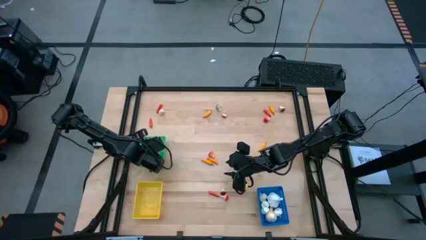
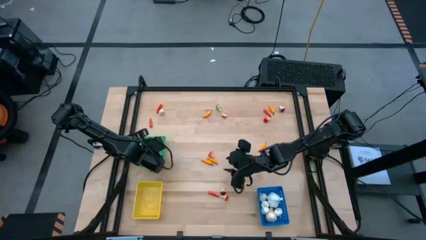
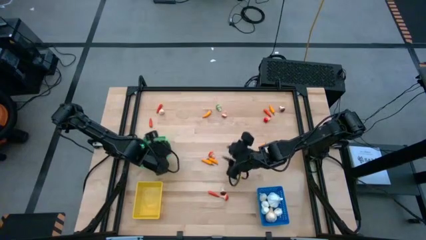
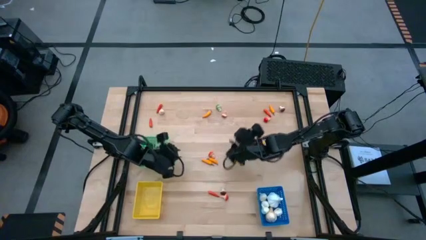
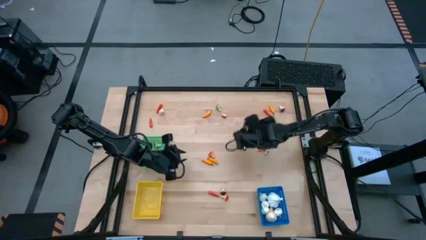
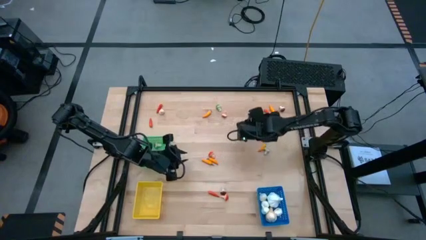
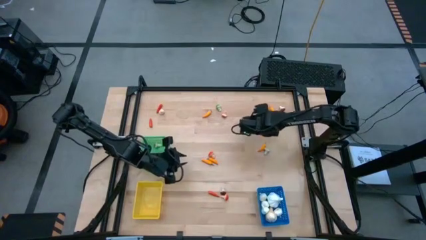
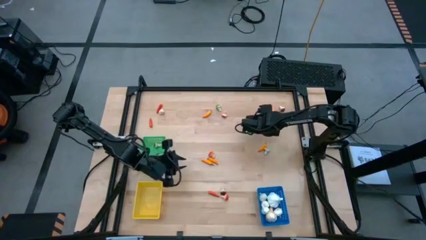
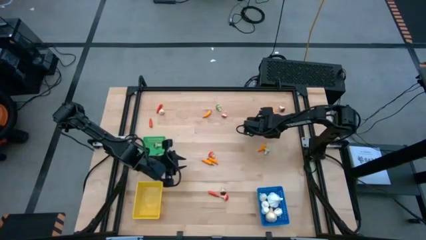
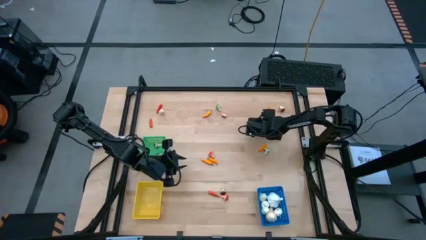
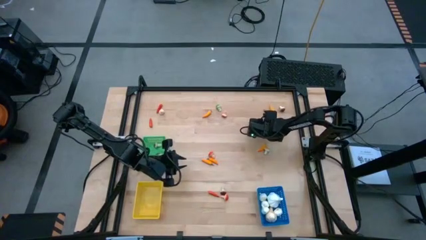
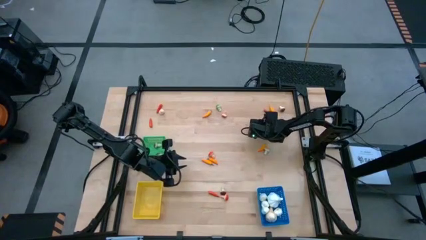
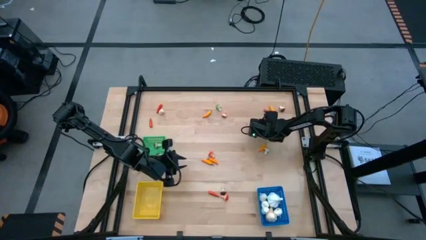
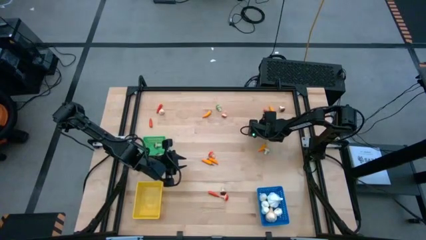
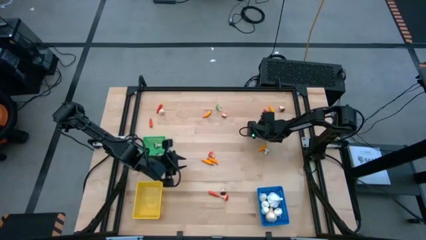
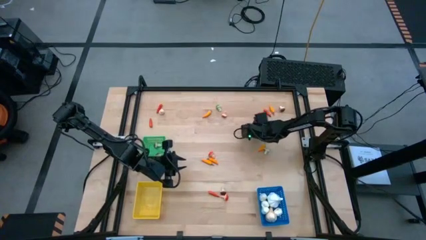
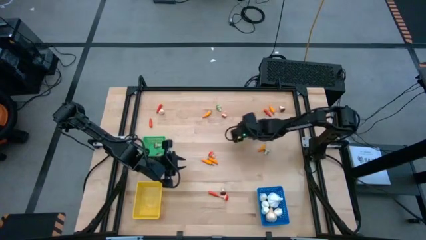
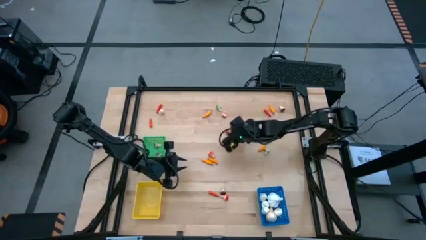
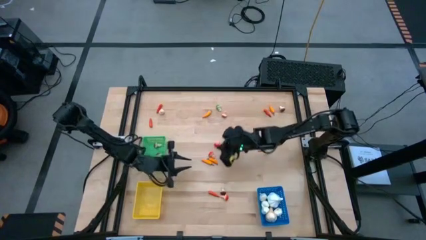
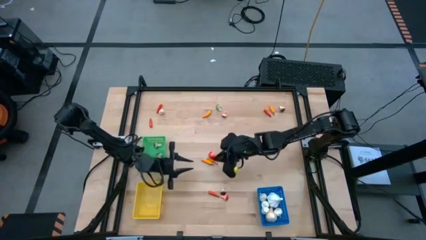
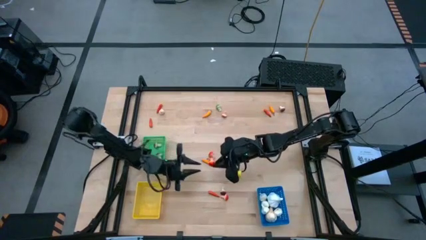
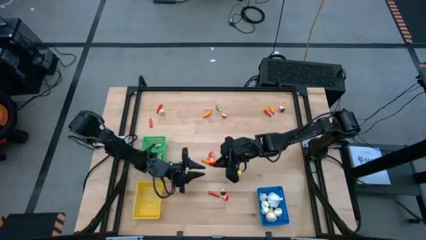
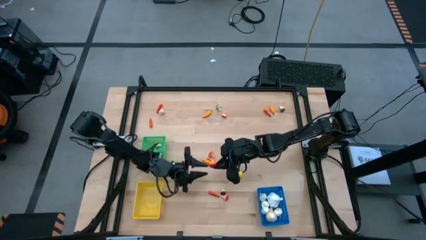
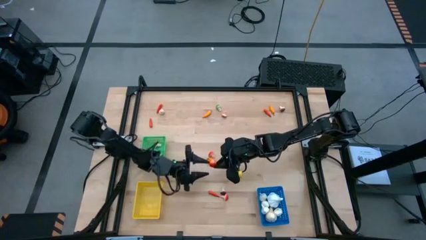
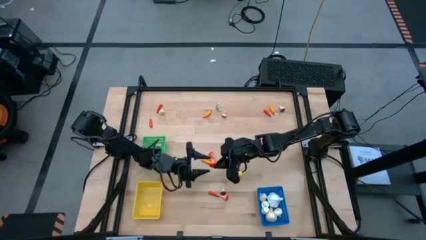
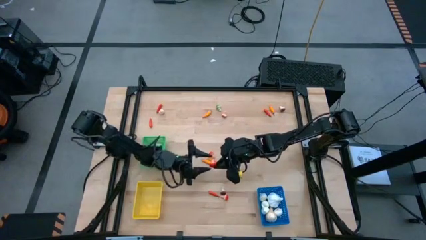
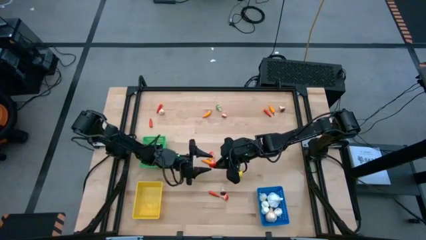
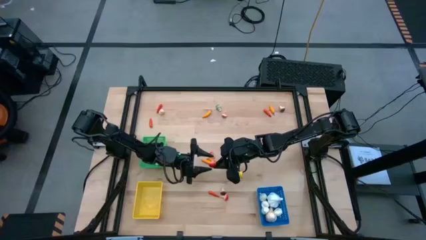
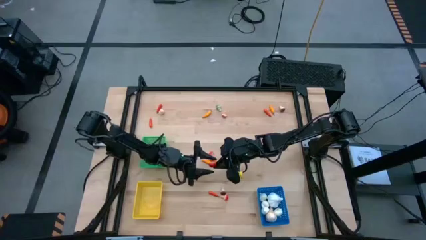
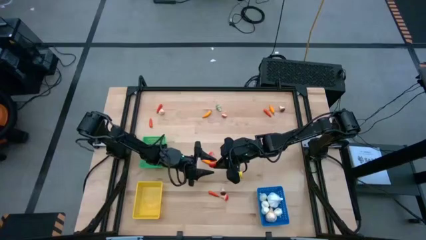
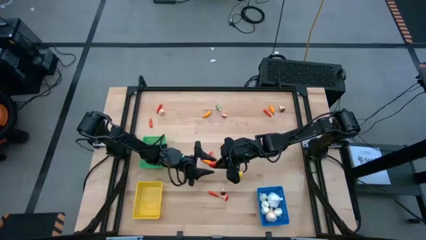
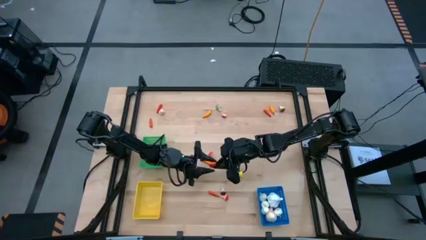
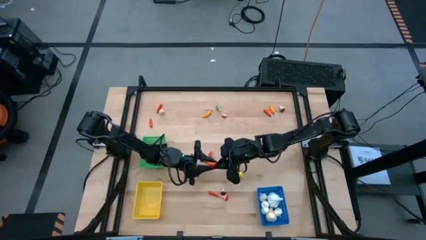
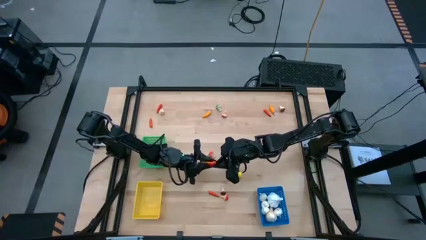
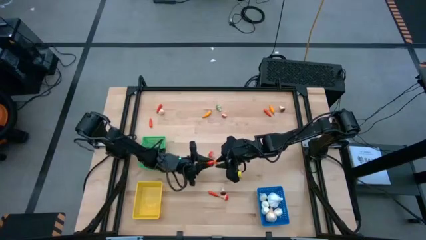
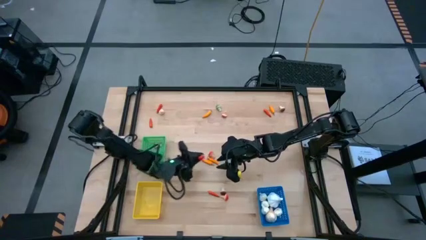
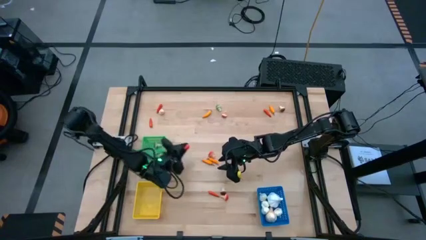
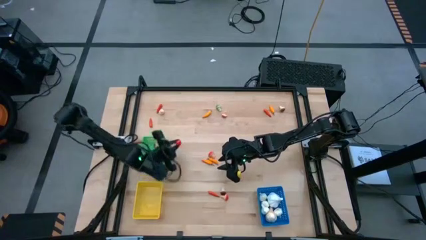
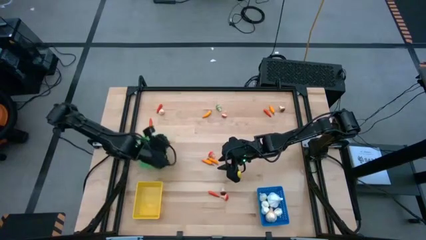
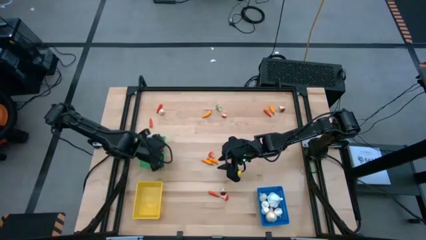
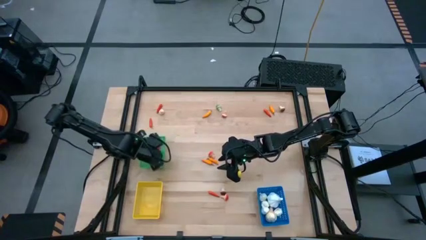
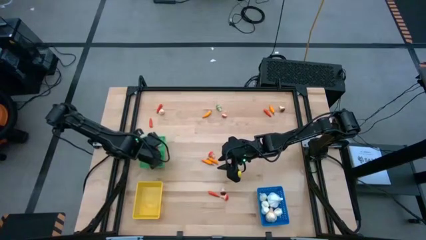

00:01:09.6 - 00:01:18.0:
Task: Sort produce into baskets
Put the red mushroom into the green bin

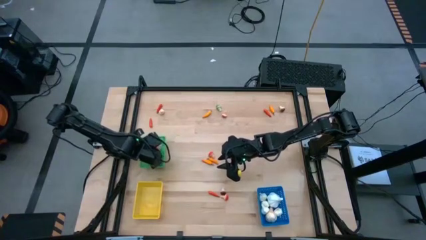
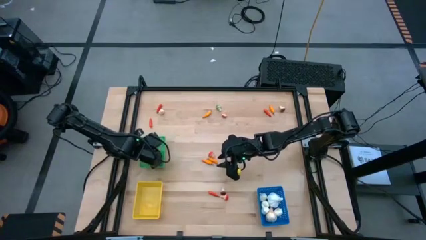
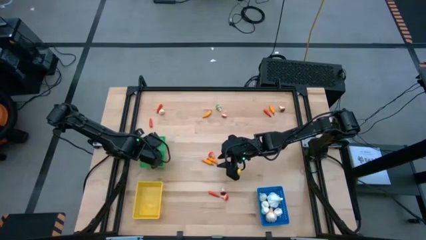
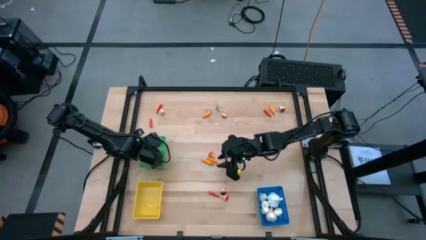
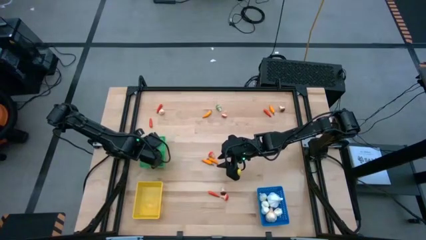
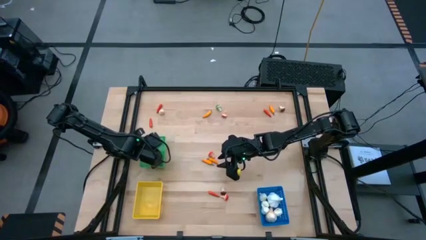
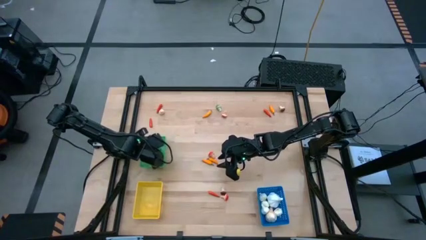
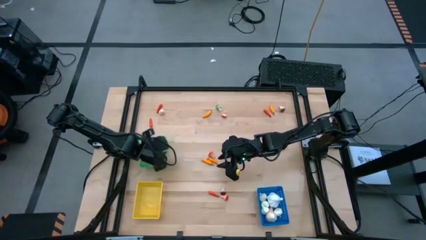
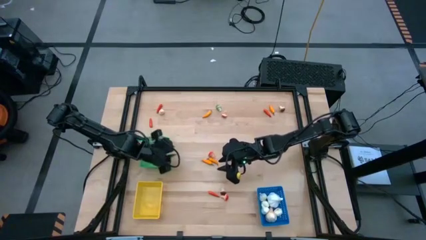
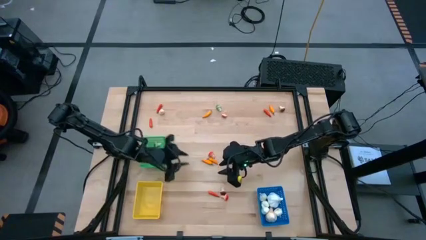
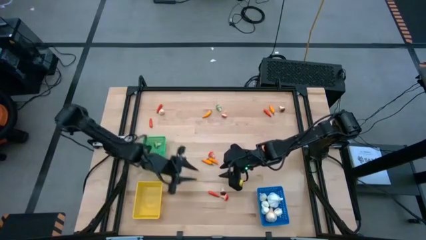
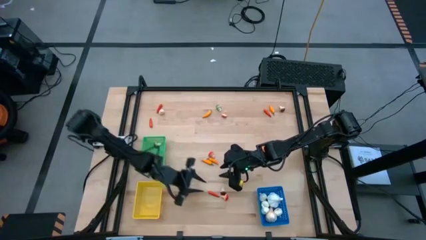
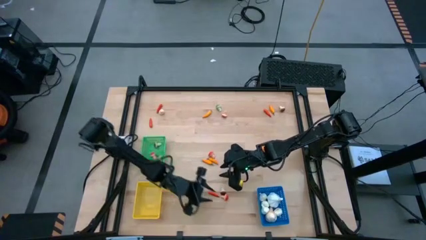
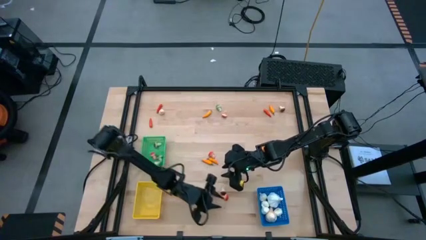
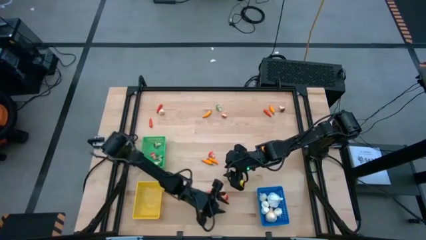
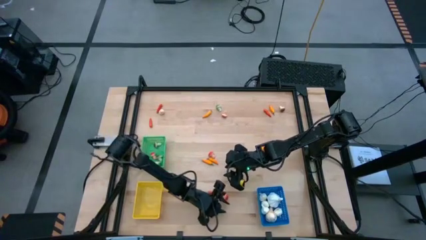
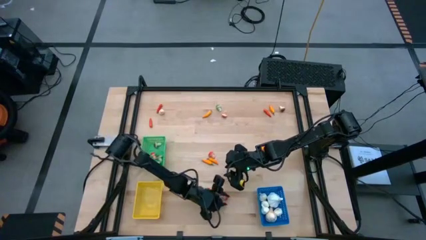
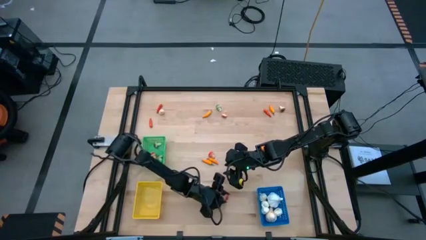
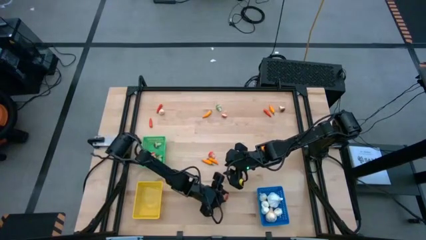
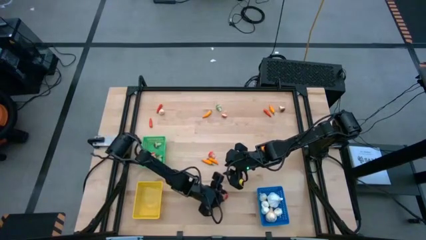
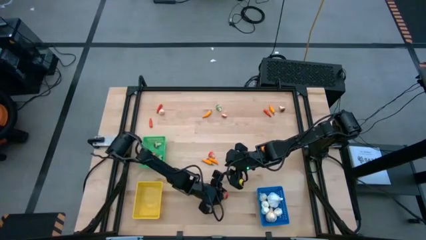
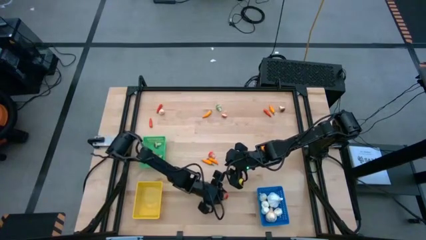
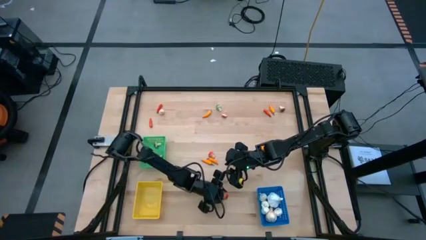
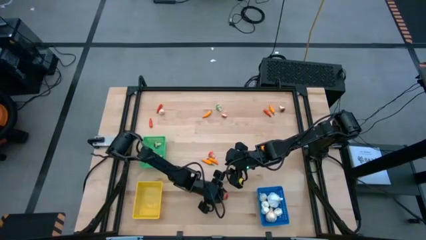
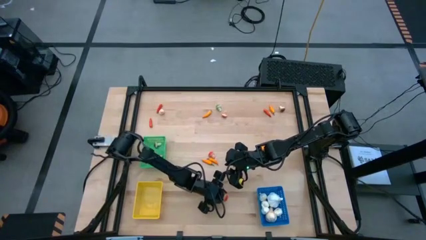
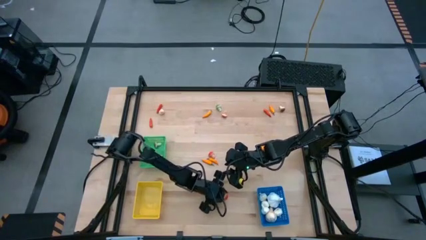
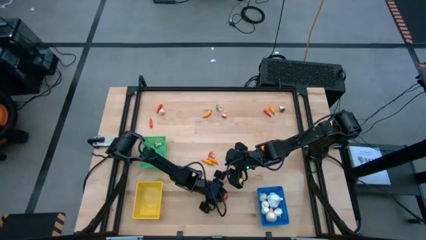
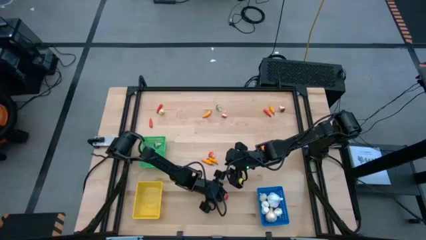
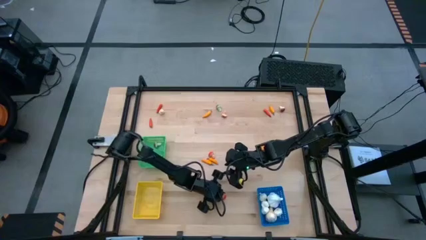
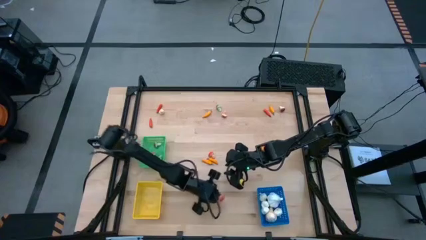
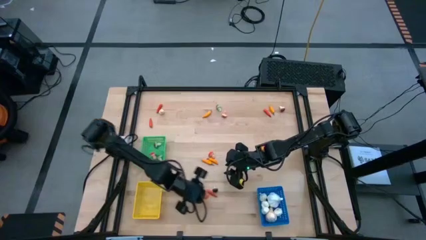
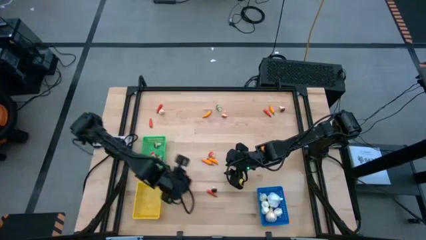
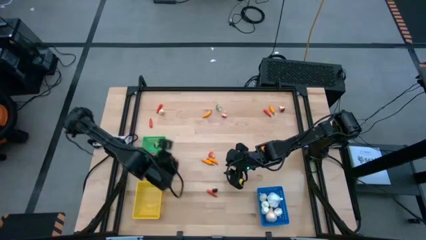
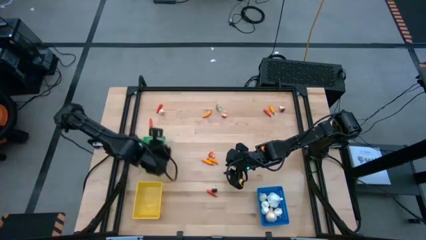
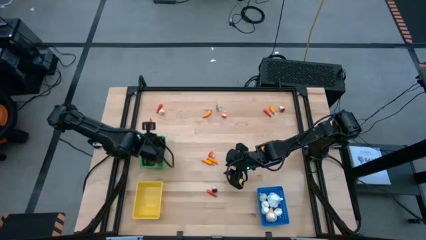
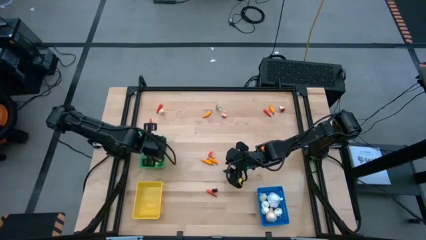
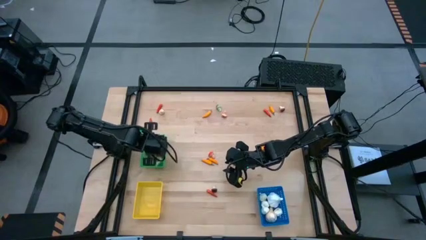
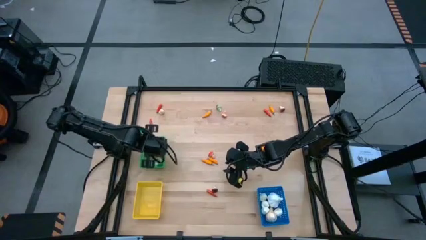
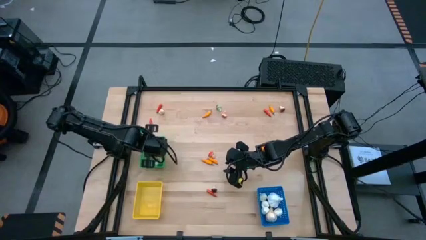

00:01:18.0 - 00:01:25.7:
Put the red mushroom into the green bin

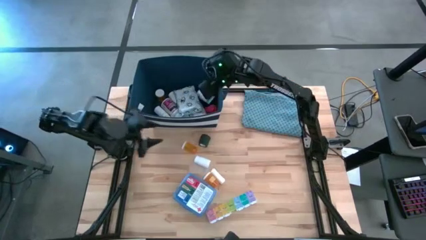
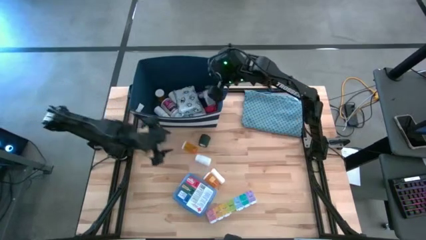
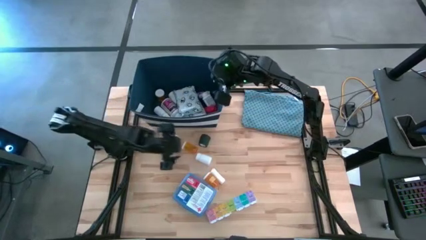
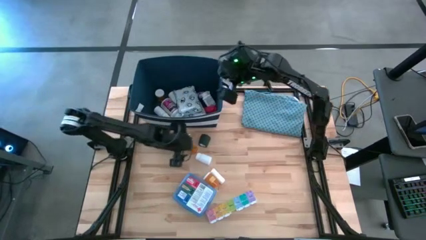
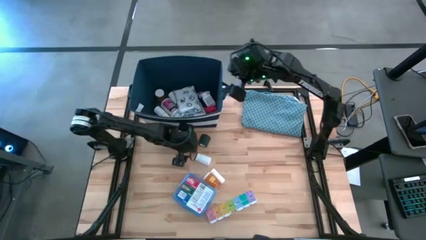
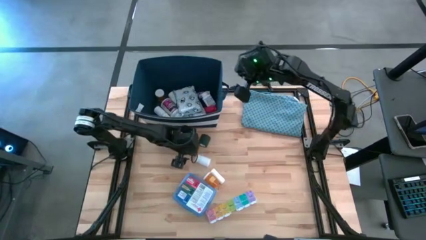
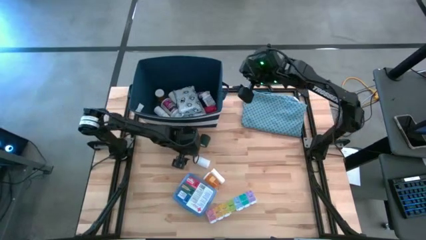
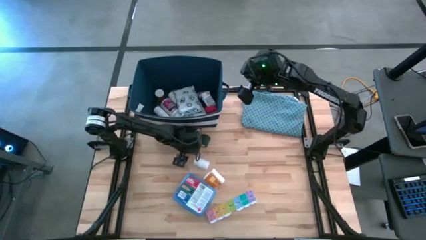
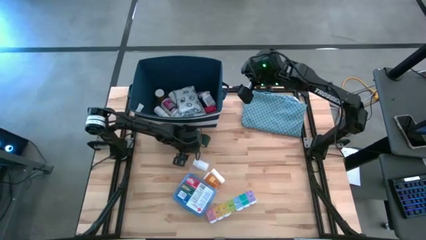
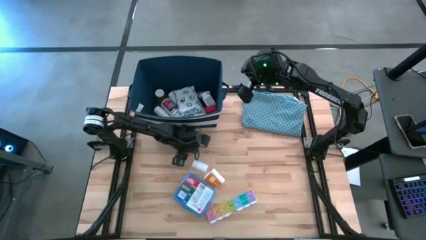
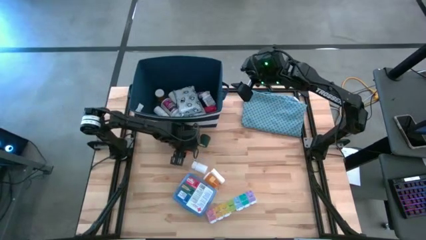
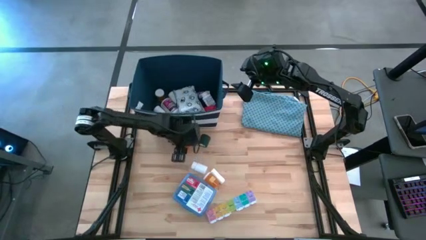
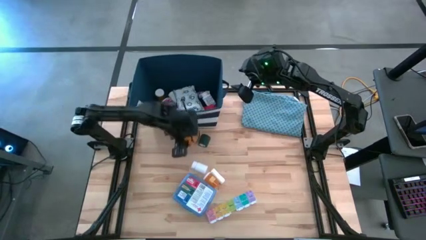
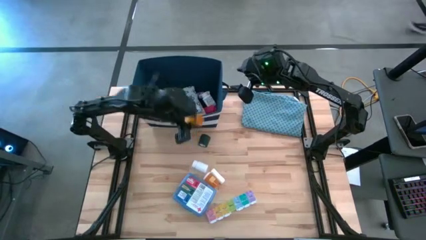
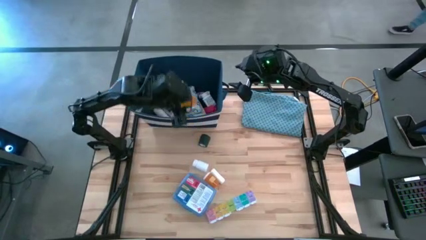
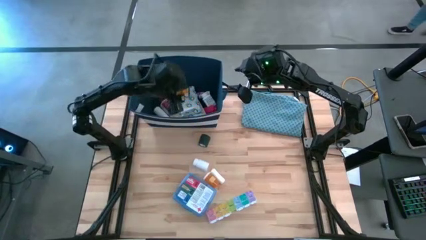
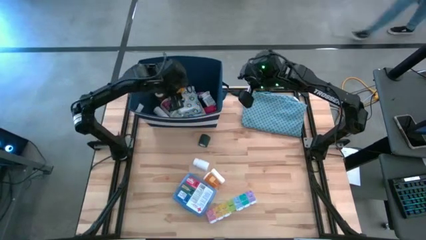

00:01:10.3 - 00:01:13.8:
Task: Pick & place medical supplies in basket/bin
Put the orange pill bottle into the blue bin
